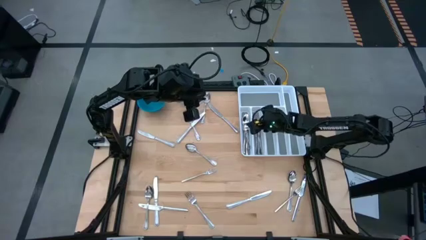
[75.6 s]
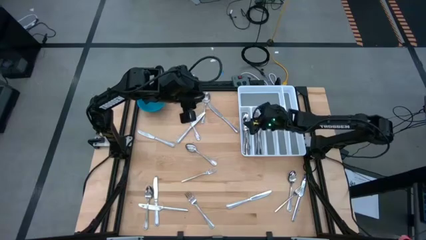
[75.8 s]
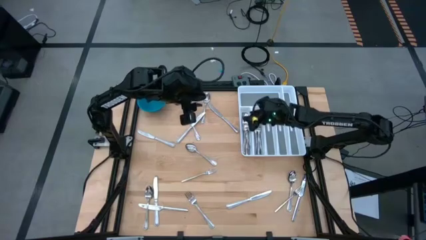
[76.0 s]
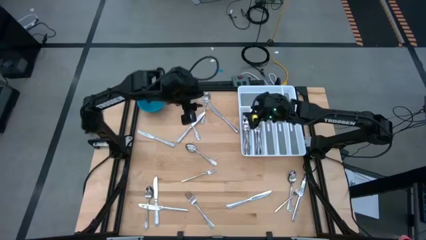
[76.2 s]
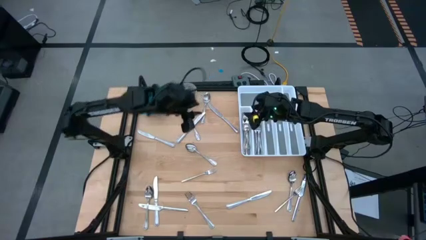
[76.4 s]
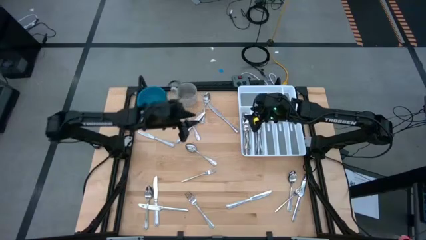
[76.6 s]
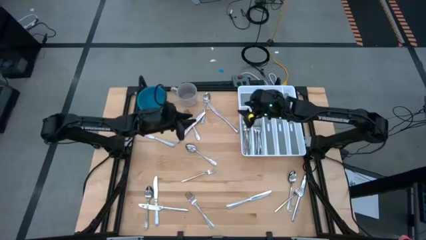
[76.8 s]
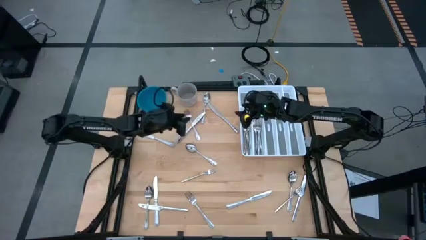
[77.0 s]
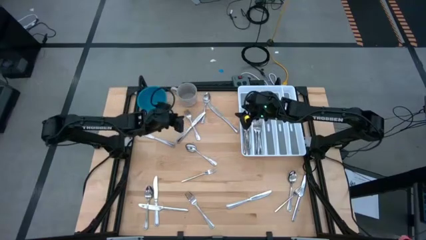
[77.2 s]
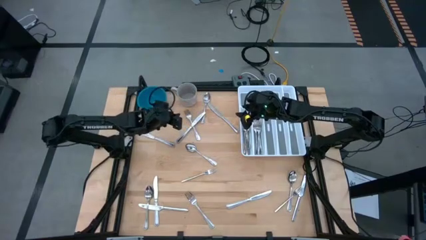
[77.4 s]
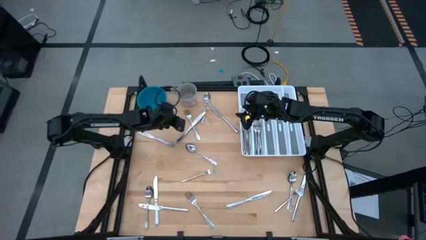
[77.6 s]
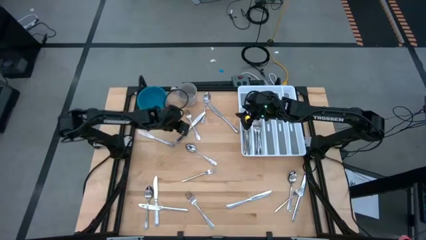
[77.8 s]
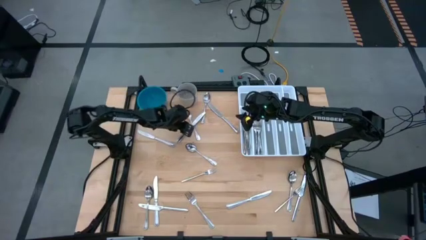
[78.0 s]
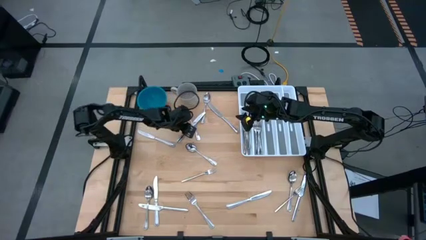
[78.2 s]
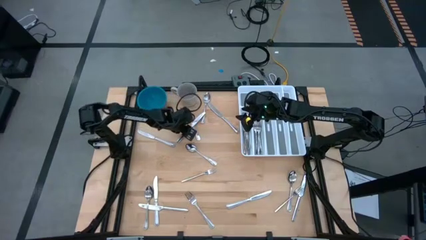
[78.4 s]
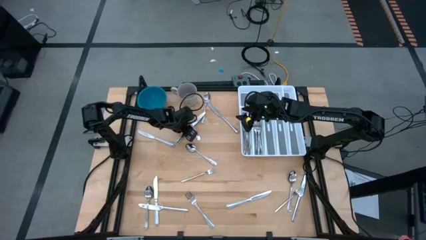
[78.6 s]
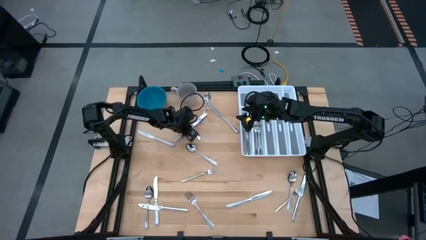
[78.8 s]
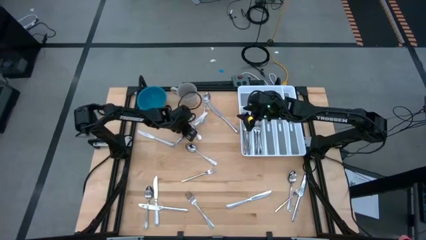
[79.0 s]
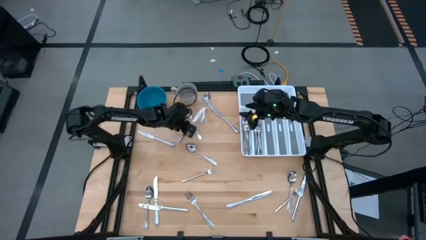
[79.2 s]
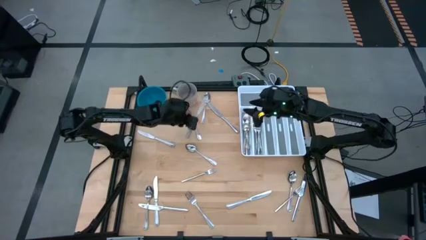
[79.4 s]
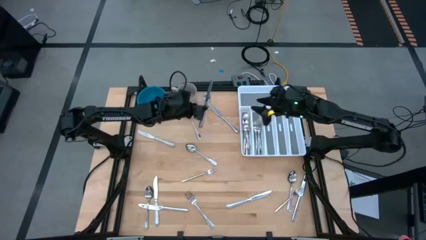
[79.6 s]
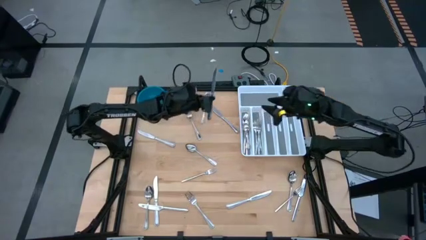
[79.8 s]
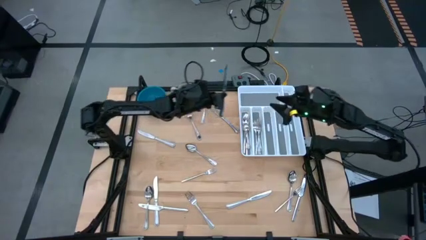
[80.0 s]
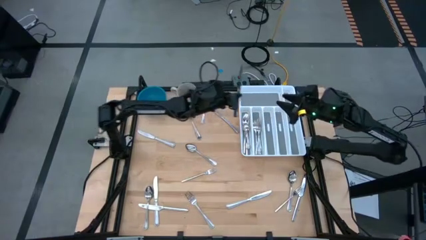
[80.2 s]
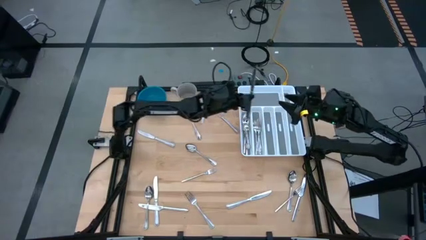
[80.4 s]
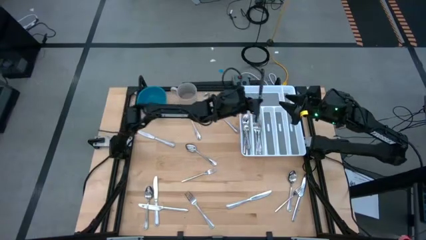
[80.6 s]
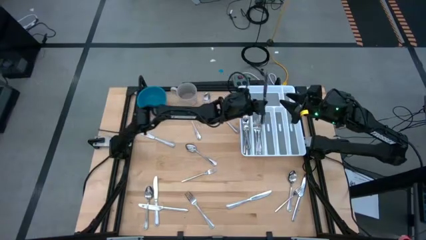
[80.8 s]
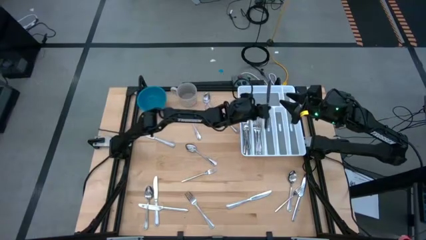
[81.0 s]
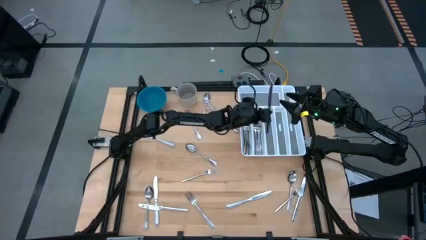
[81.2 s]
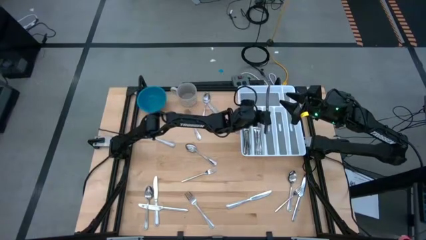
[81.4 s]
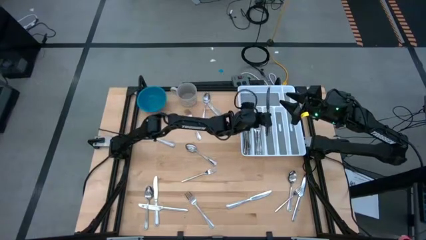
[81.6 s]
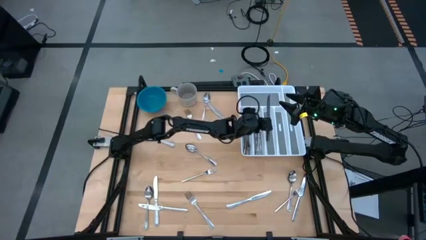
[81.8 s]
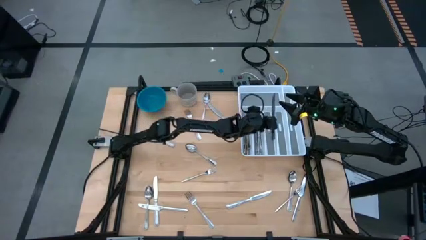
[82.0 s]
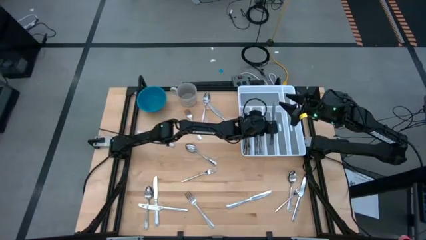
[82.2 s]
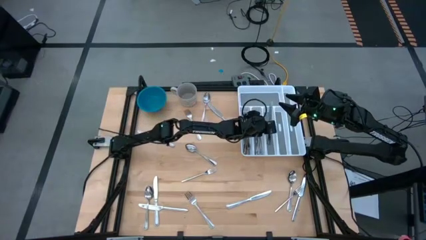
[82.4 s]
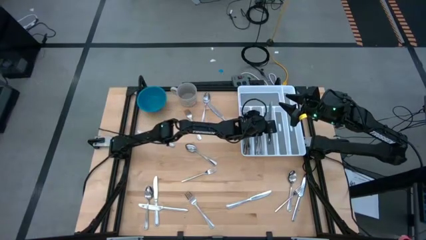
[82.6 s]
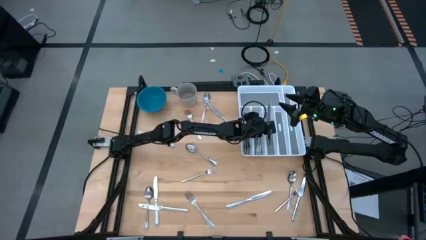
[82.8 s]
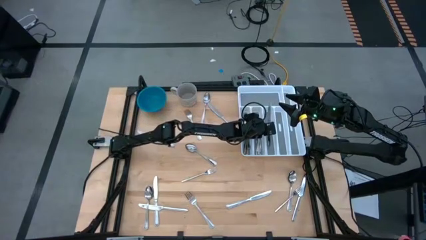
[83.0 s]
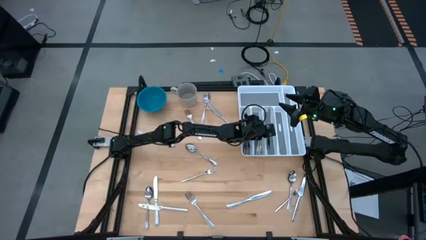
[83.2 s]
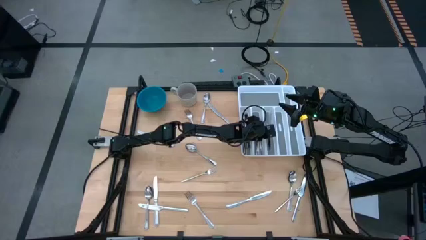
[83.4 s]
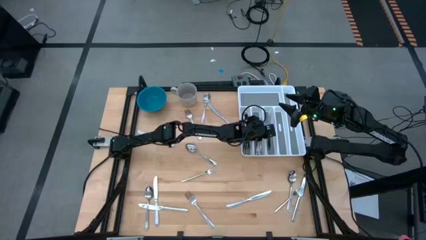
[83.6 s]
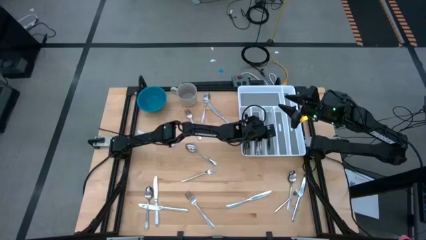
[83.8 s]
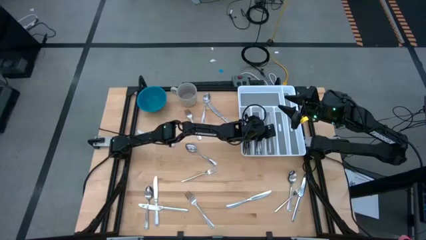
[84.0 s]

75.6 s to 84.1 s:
Task: Sort silverware
Put the table knife in the silverware tray

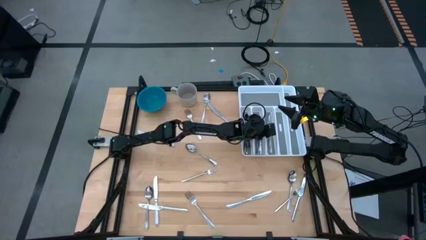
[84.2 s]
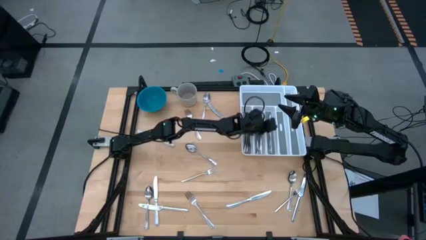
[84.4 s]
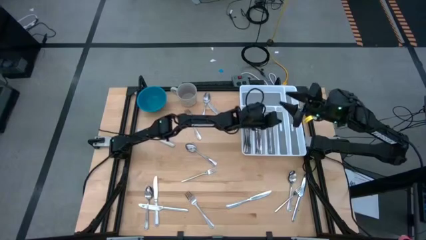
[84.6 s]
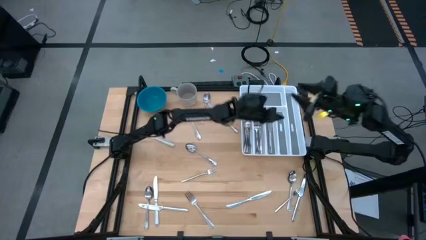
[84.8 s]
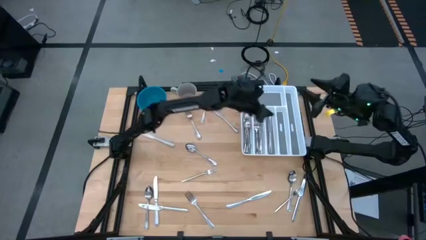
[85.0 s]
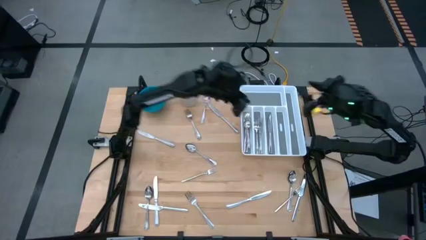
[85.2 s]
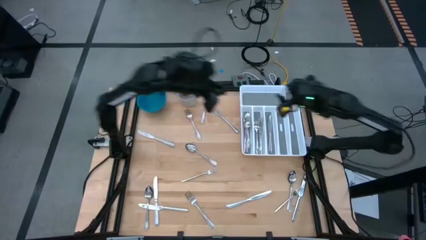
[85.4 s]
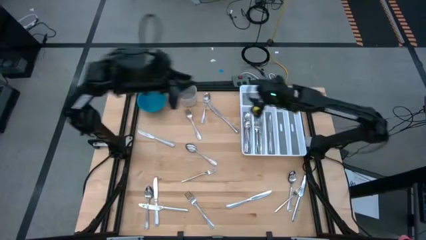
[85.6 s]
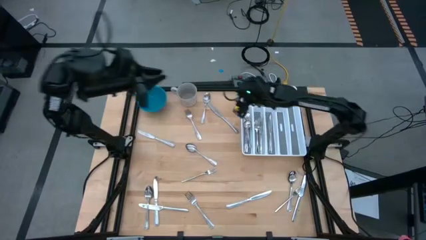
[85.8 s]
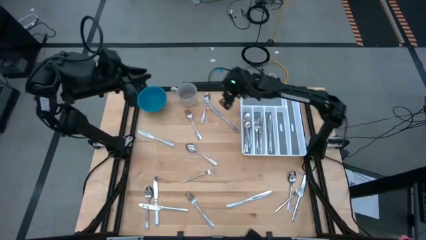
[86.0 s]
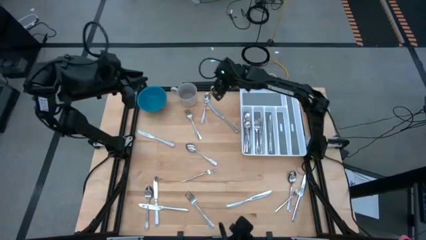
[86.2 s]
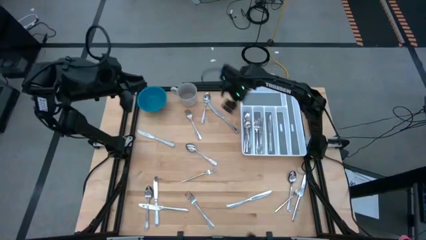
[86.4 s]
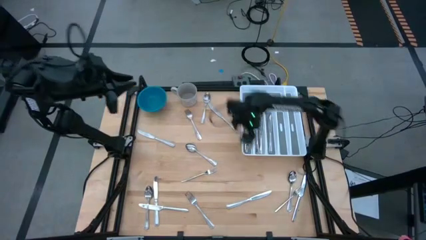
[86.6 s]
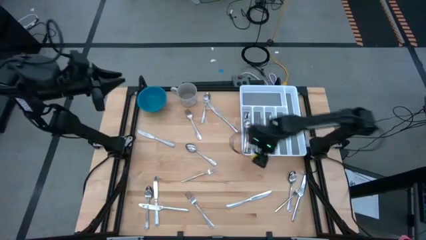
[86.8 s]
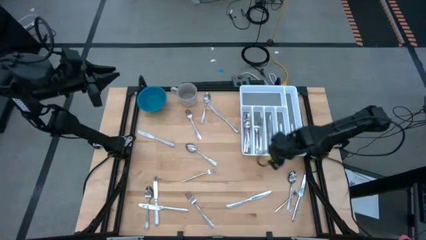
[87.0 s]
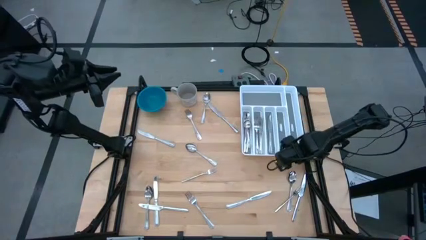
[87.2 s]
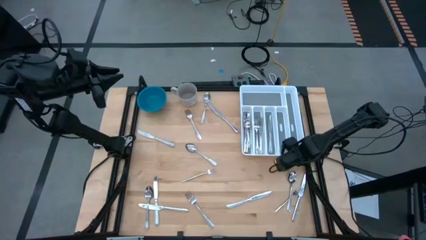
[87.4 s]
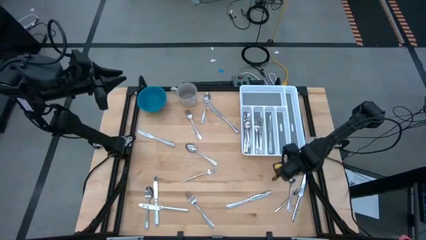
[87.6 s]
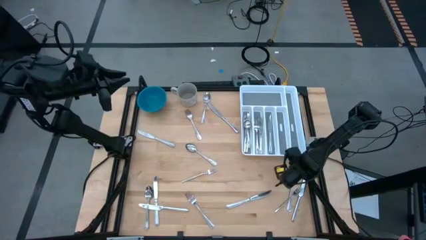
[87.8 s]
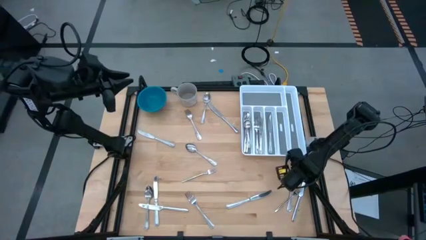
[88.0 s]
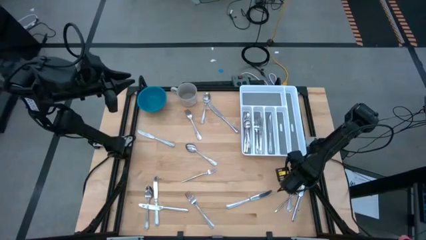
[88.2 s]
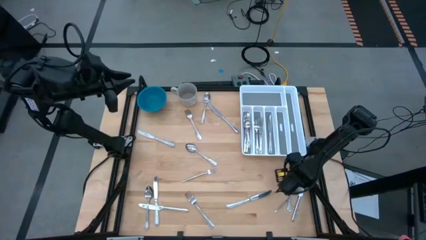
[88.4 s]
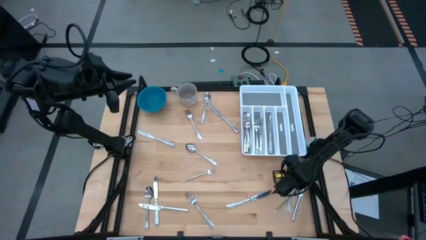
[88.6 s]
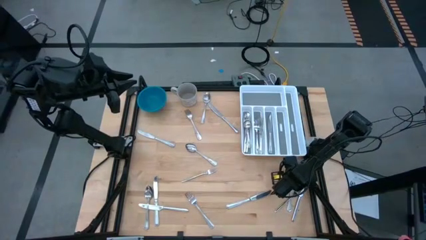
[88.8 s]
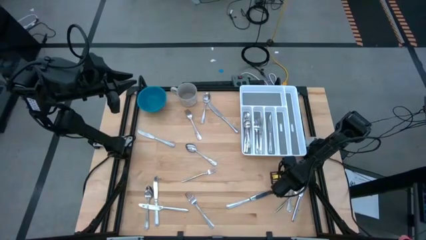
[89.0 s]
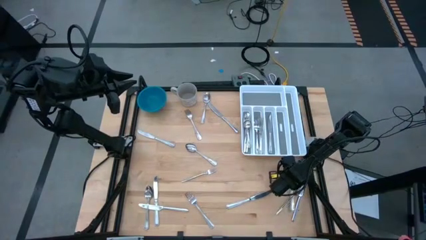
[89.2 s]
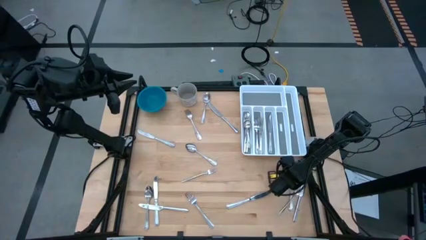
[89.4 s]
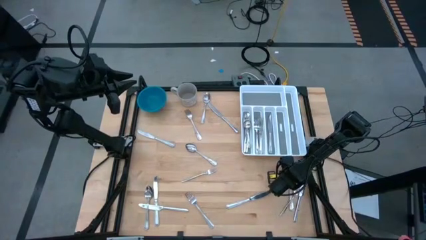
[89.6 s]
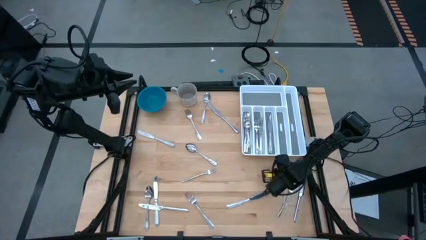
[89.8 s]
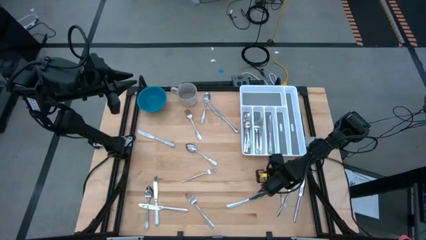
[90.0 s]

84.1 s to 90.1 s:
Put the spoon in the silverware tray

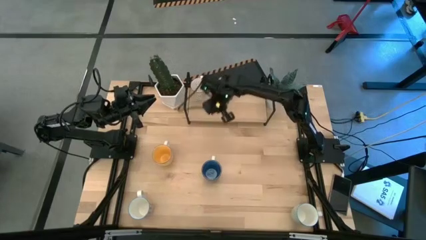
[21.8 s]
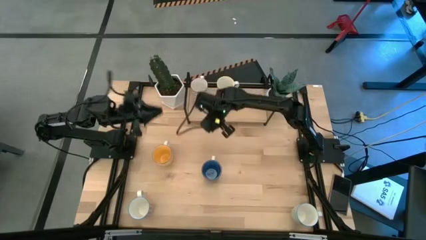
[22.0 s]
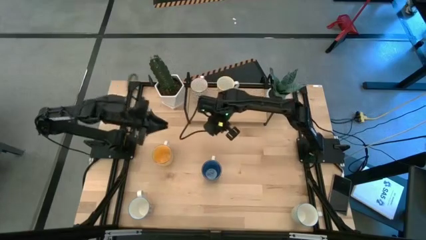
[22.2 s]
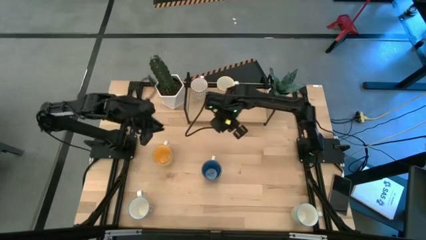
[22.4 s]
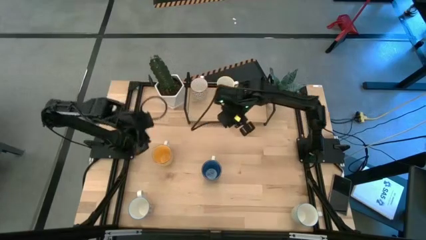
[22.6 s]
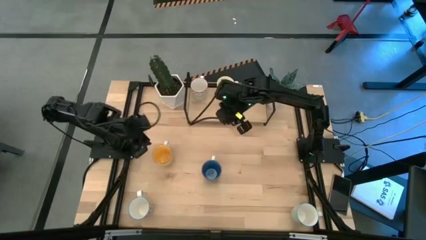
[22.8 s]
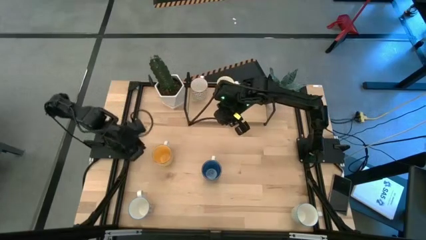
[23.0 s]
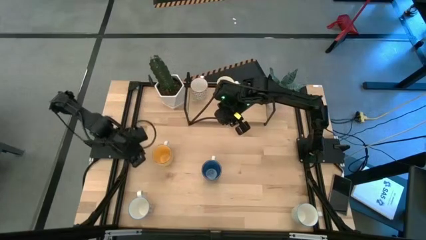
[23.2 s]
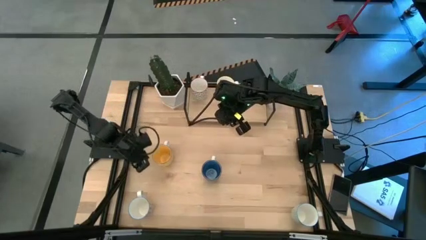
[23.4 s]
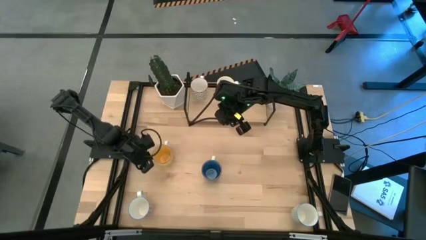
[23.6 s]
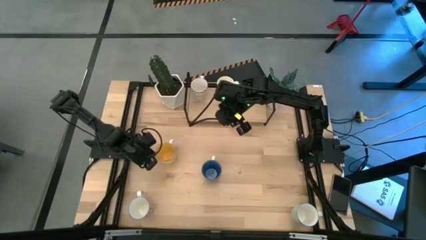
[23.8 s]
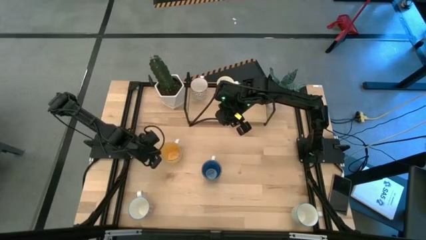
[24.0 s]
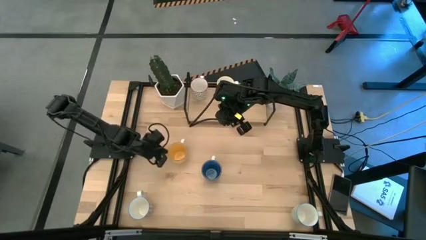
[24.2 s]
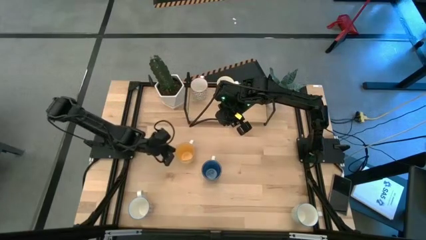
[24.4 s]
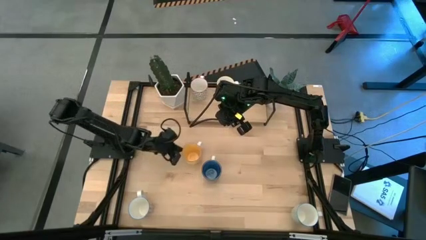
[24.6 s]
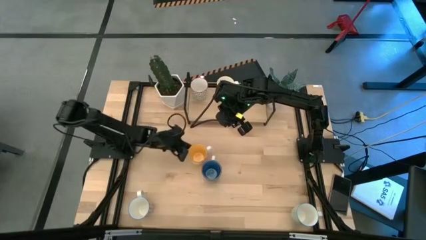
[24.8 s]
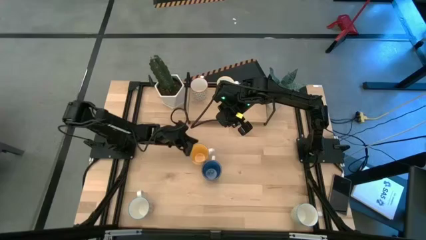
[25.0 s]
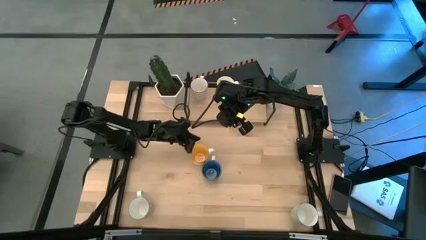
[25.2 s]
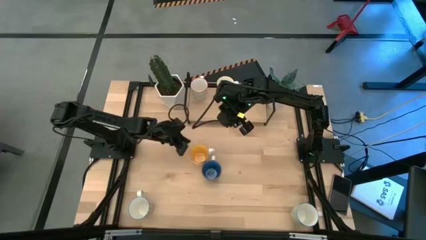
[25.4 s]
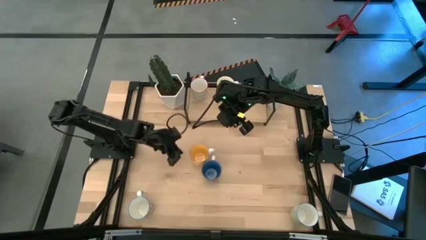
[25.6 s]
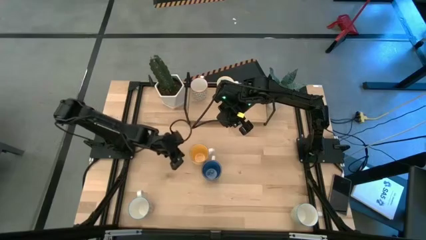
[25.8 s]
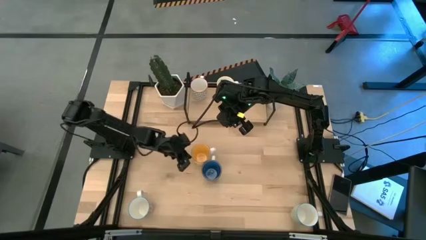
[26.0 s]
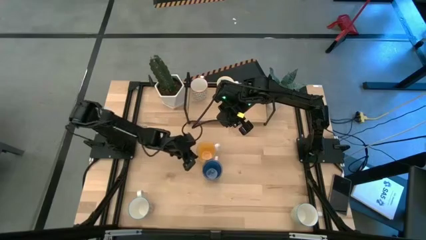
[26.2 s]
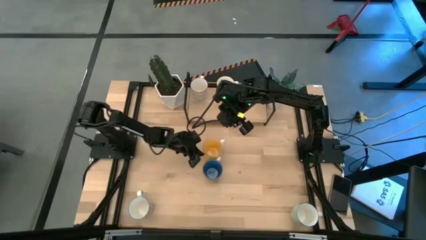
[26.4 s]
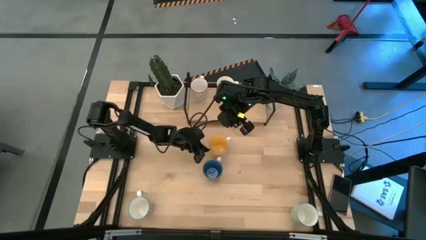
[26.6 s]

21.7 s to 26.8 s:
Task: Place coffee mugs
Move the yellow mug to the center
